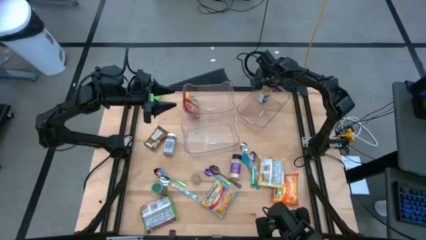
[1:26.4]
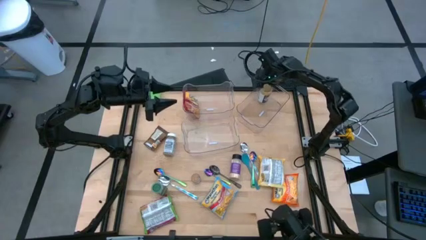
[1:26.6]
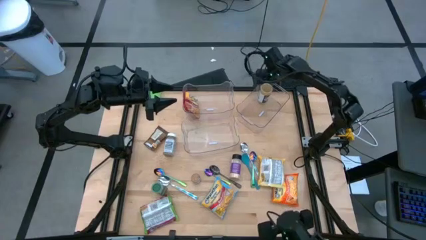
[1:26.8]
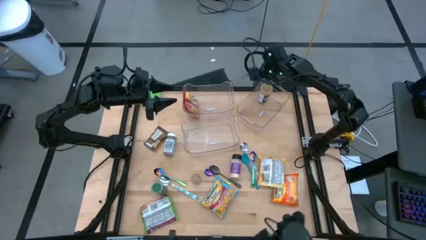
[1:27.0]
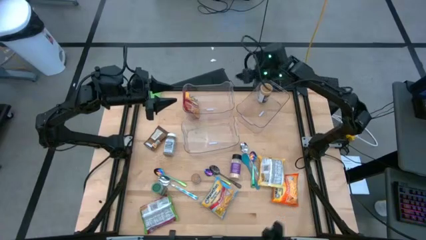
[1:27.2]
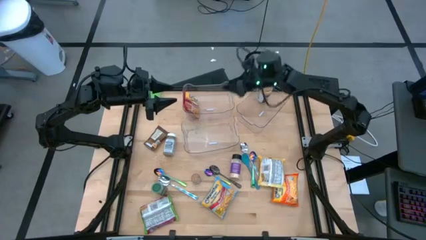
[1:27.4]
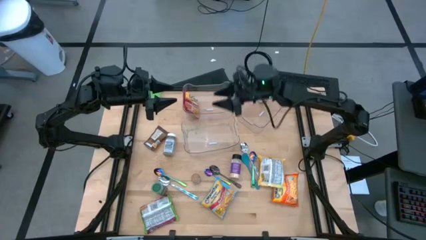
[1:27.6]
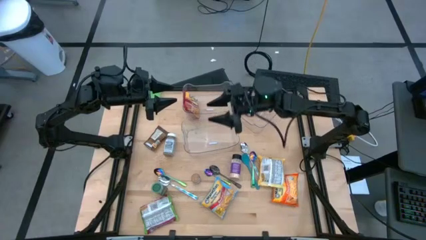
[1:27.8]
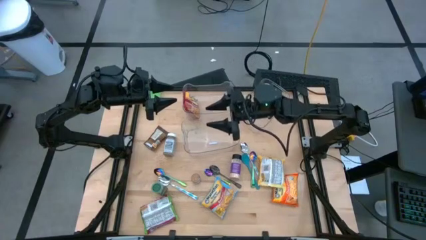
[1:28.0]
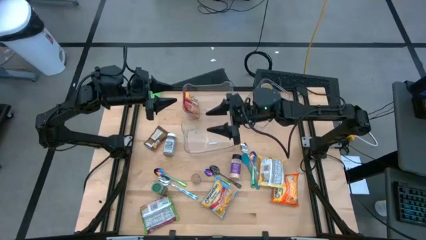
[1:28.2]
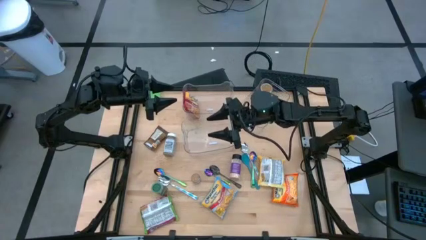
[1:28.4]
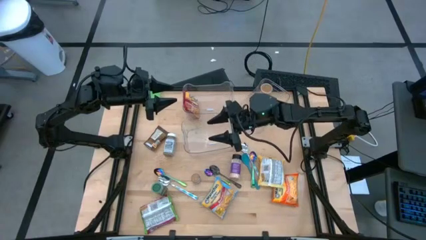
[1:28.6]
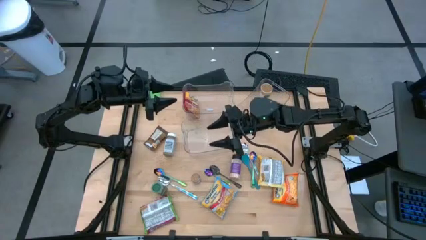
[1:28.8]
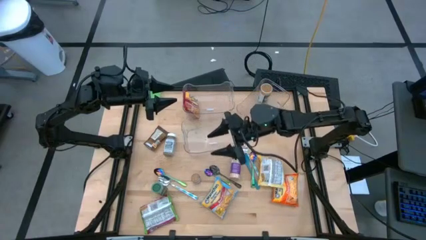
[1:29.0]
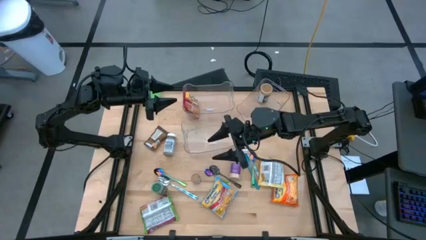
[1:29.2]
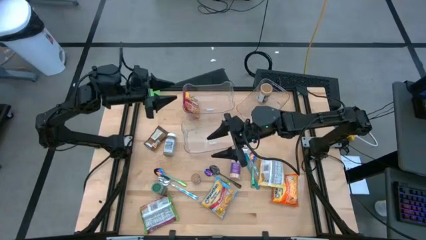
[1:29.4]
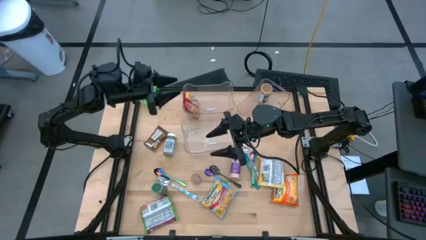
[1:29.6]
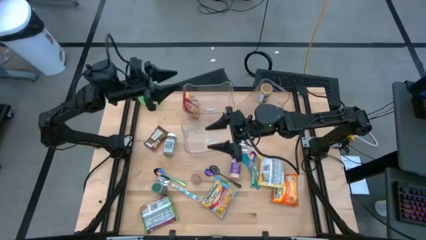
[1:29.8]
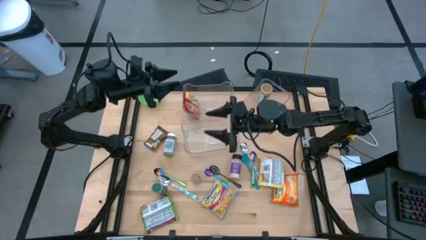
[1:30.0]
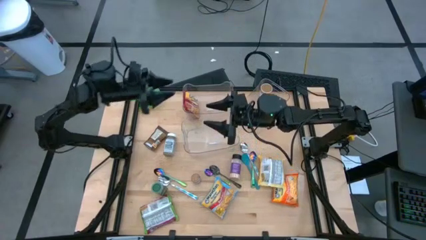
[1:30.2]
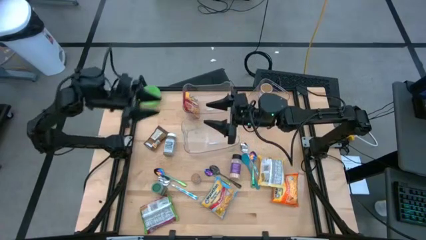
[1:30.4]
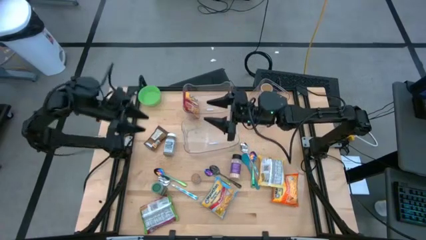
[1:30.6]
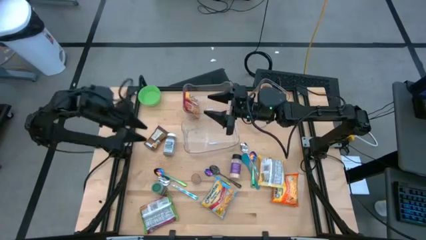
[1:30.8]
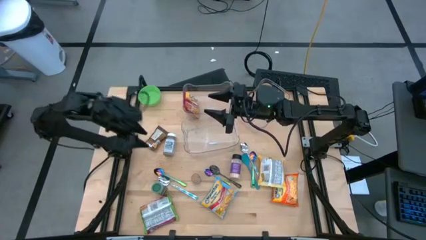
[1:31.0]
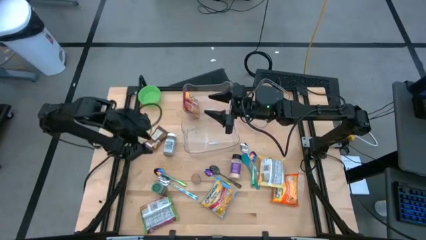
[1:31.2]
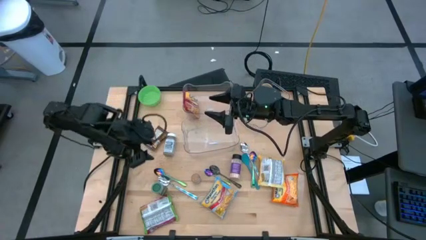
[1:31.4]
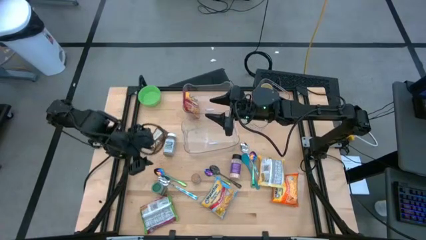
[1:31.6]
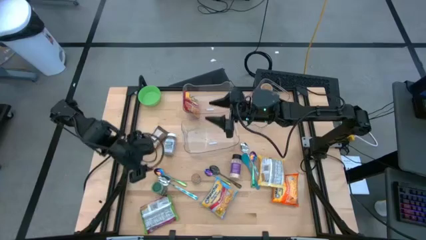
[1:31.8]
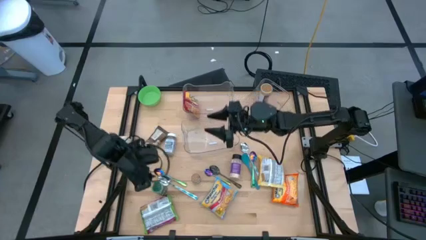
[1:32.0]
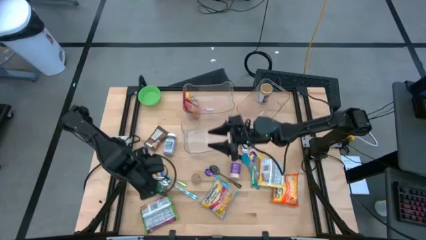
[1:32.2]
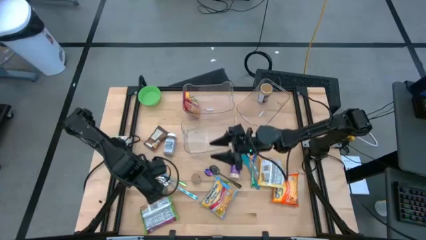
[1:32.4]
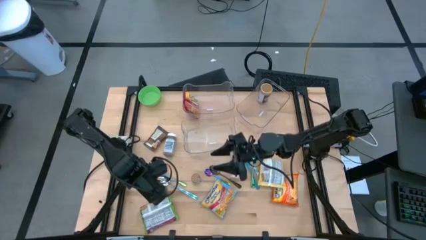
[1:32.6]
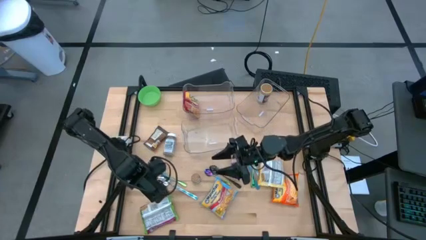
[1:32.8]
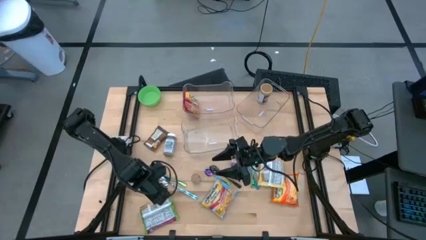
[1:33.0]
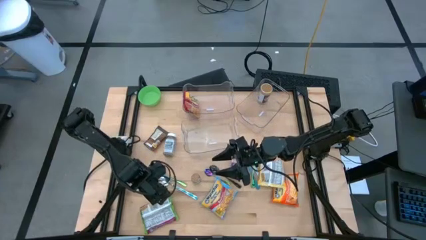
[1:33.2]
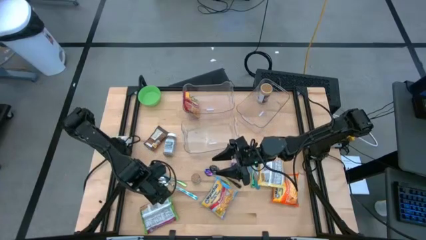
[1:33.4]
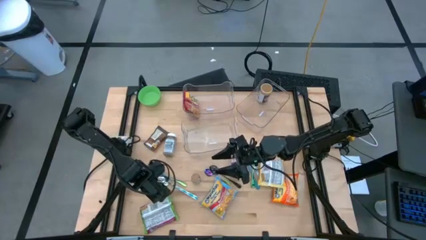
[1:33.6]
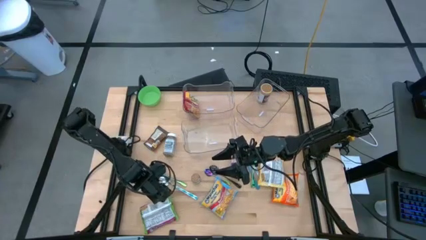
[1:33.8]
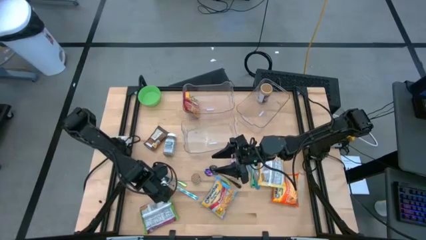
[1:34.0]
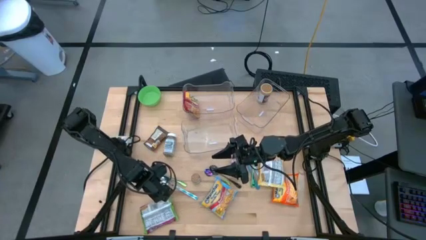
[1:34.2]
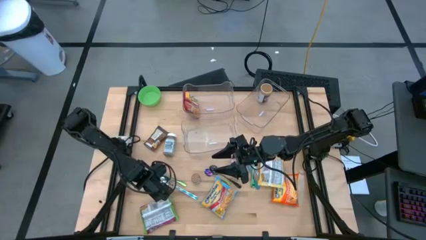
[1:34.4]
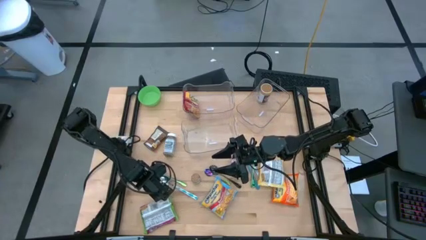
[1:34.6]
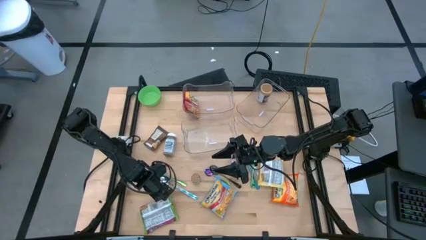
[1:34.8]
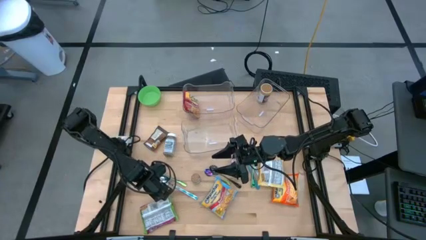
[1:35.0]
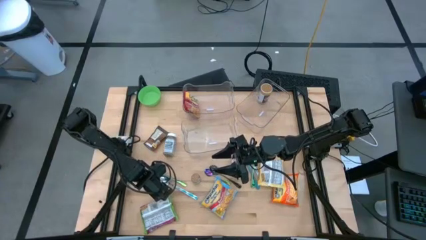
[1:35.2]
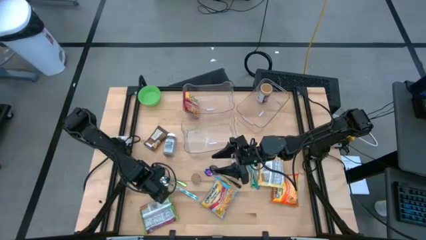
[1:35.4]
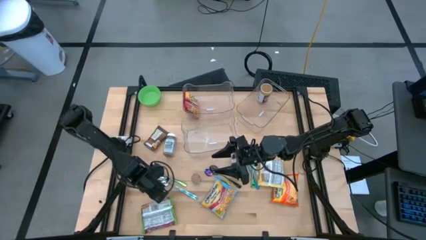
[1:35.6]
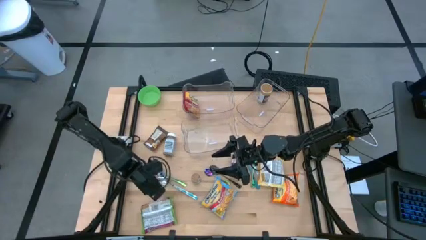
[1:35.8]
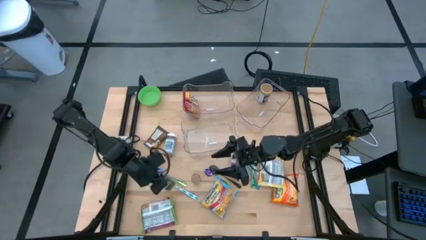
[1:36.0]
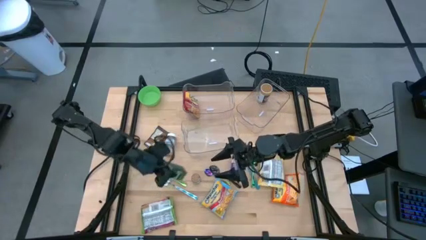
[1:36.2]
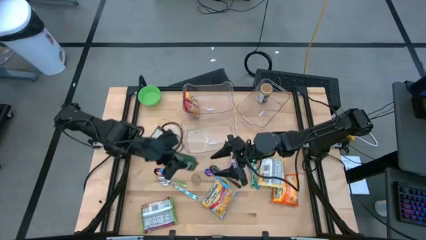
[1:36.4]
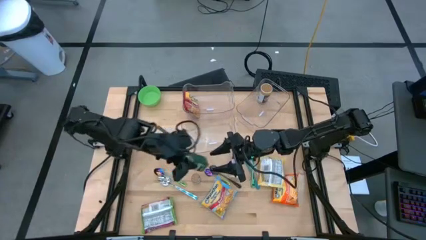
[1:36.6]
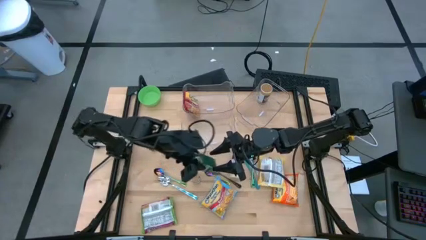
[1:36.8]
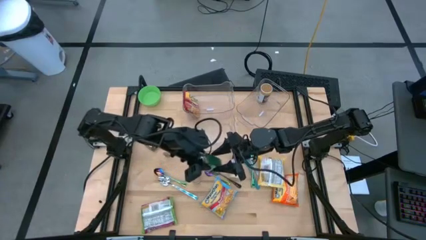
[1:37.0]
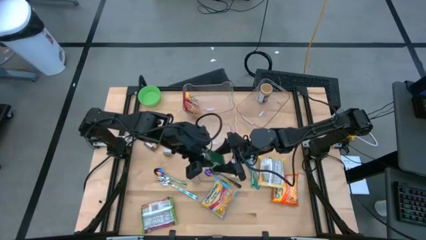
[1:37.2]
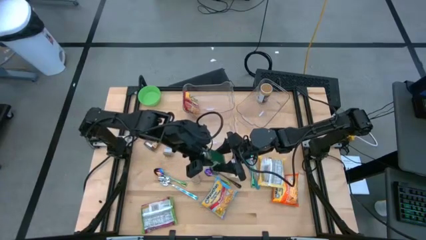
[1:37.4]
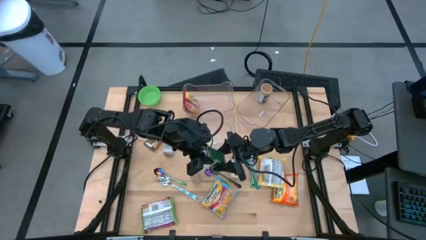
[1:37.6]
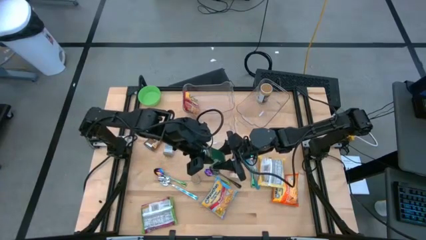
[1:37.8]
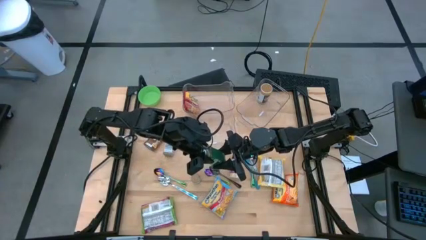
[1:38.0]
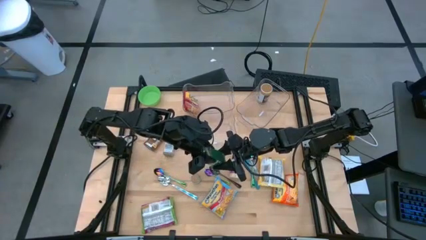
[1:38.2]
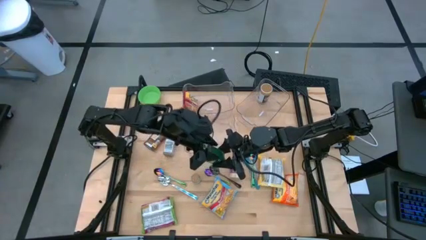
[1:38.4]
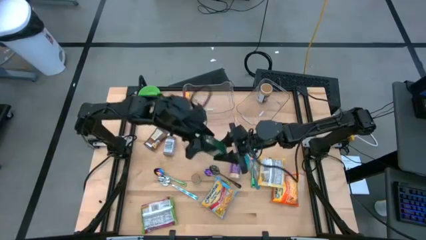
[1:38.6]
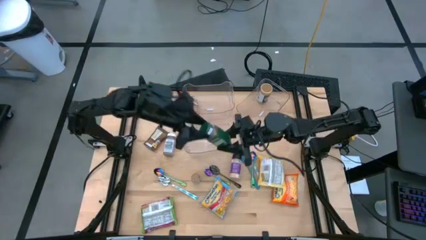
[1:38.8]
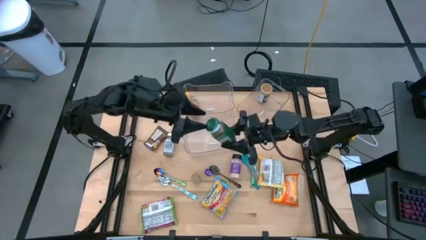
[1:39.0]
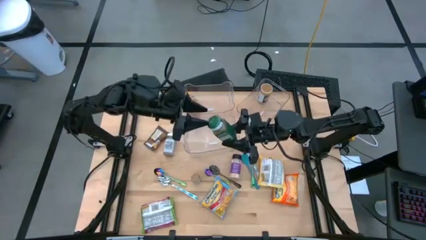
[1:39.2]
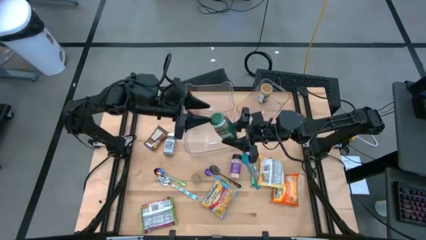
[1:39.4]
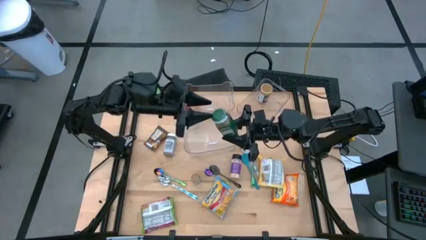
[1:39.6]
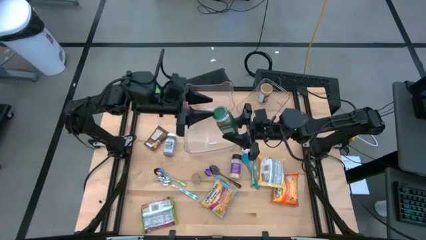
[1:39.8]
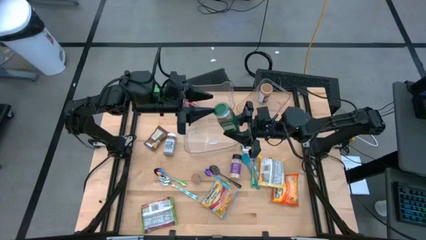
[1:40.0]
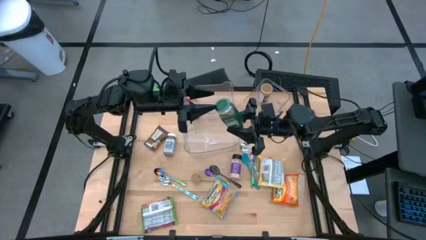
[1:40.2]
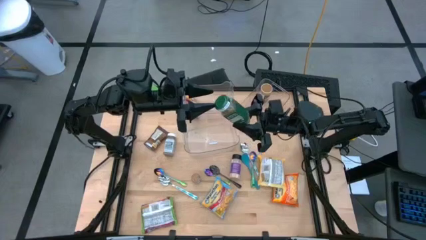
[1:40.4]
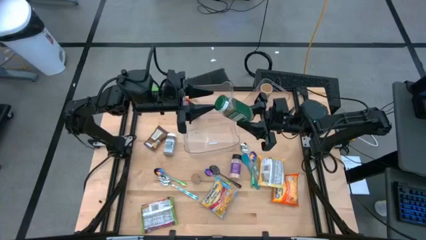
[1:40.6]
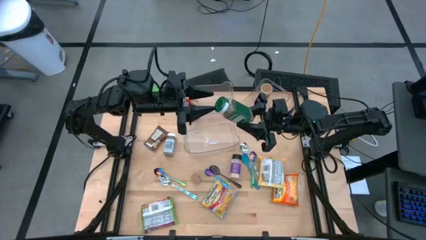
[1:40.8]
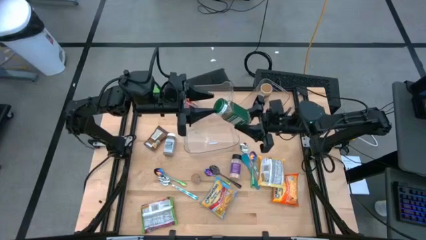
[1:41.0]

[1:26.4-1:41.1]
Task: Pick & Place Food Item
Put the green seasoning bottle into the top right transparent bin
